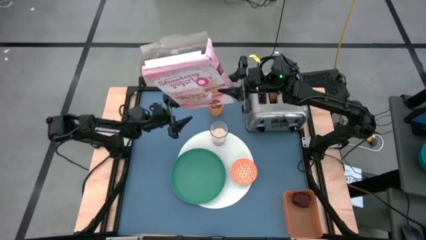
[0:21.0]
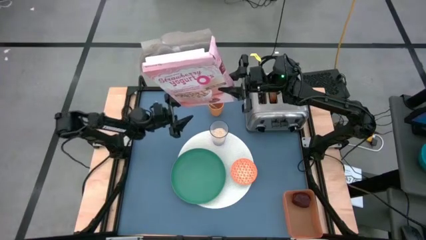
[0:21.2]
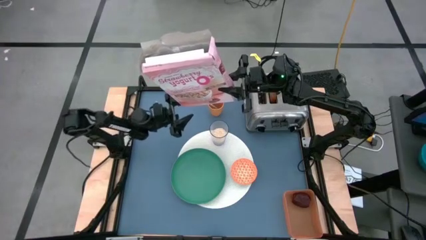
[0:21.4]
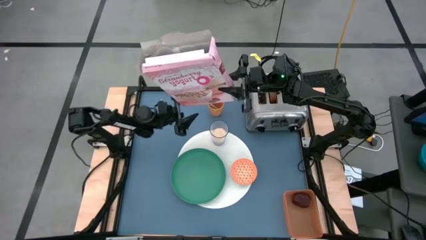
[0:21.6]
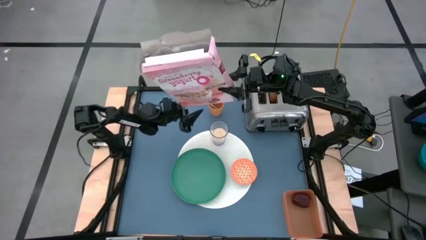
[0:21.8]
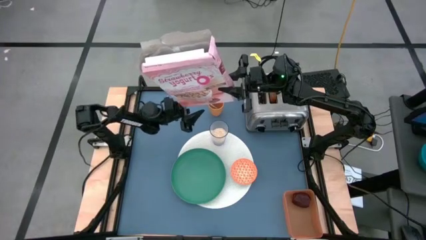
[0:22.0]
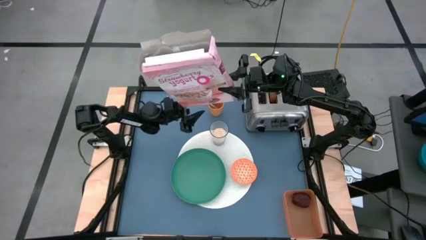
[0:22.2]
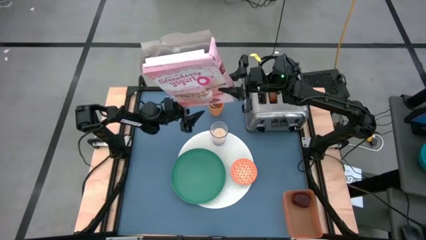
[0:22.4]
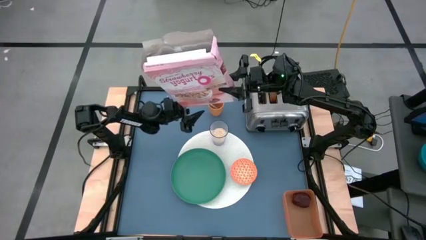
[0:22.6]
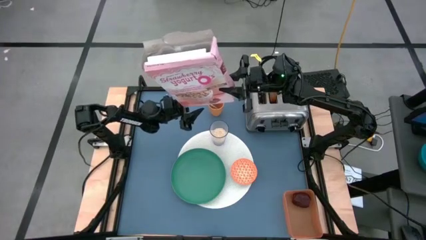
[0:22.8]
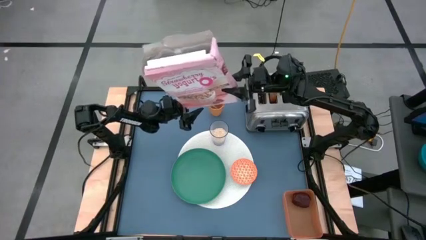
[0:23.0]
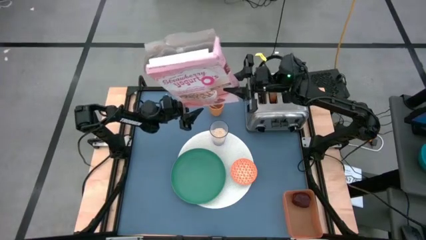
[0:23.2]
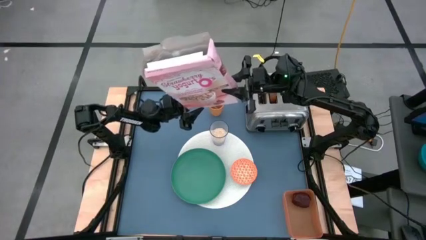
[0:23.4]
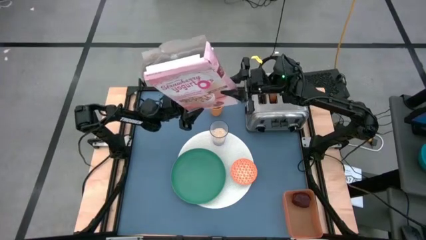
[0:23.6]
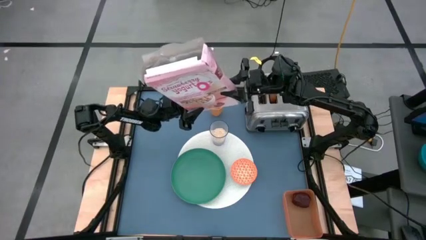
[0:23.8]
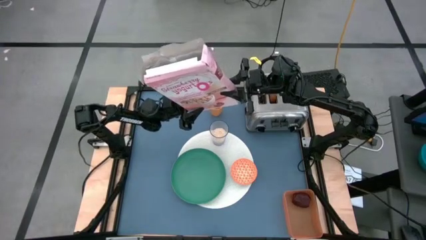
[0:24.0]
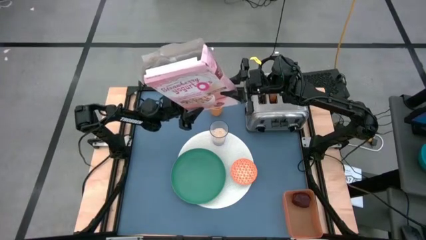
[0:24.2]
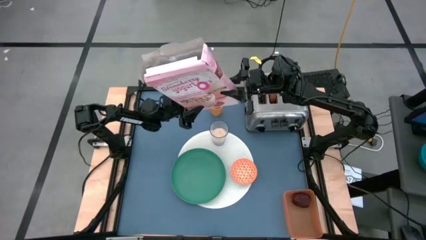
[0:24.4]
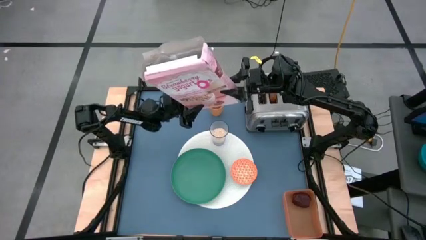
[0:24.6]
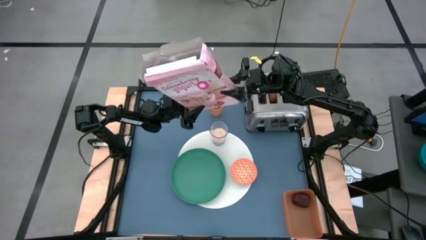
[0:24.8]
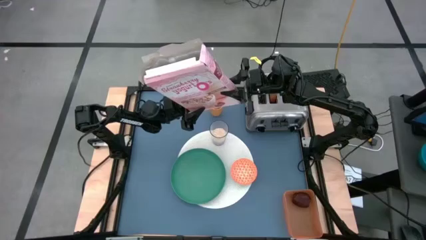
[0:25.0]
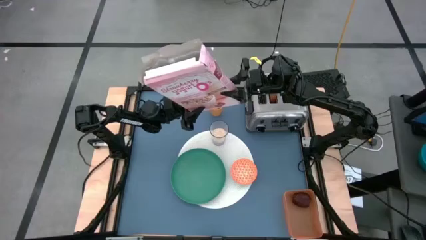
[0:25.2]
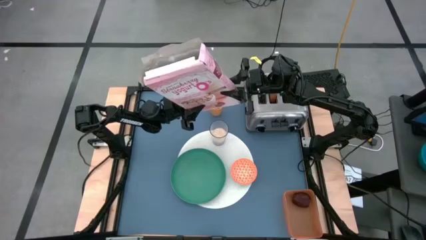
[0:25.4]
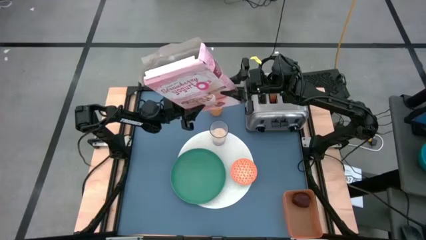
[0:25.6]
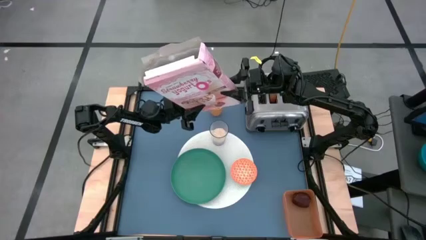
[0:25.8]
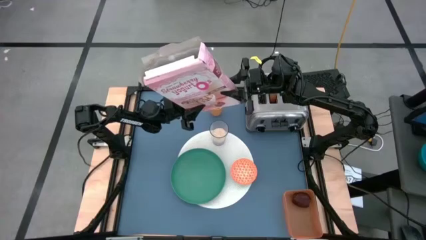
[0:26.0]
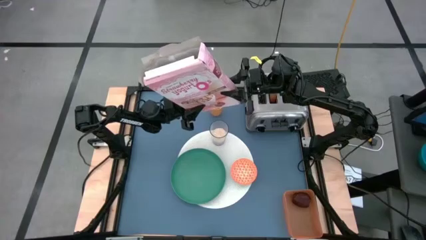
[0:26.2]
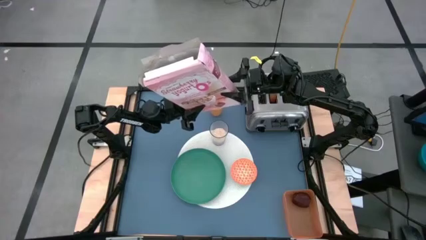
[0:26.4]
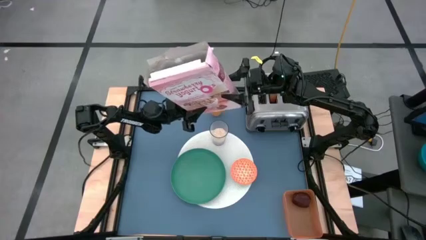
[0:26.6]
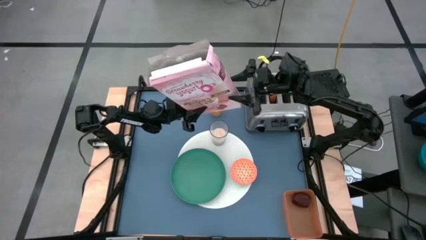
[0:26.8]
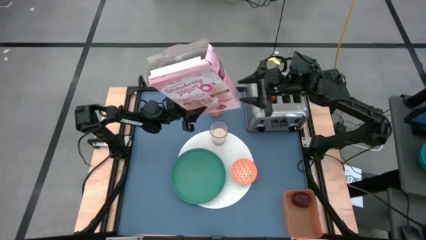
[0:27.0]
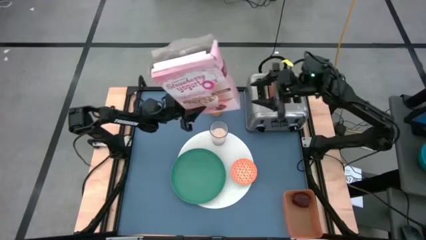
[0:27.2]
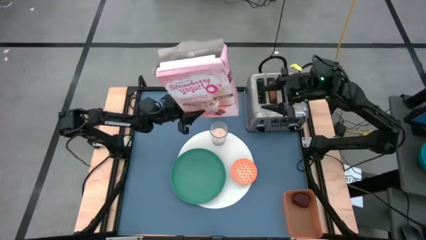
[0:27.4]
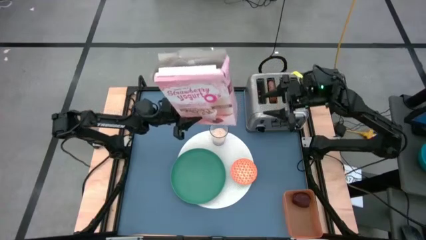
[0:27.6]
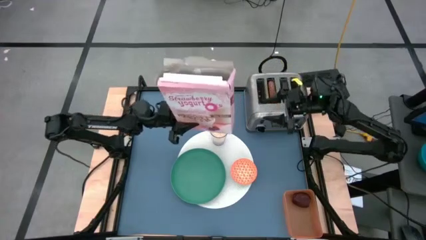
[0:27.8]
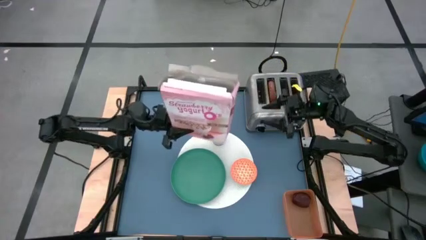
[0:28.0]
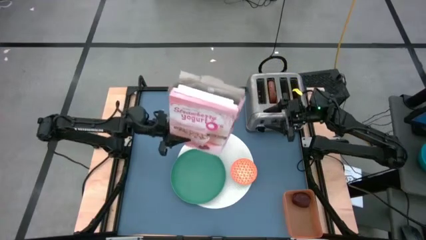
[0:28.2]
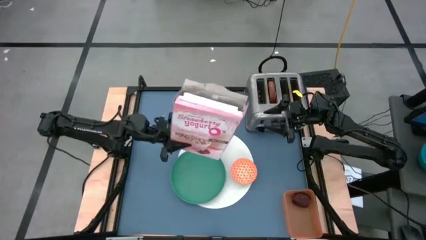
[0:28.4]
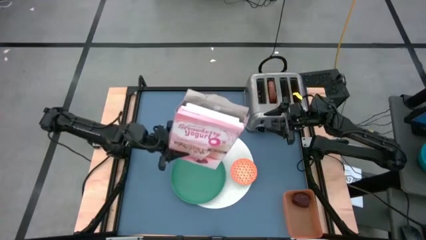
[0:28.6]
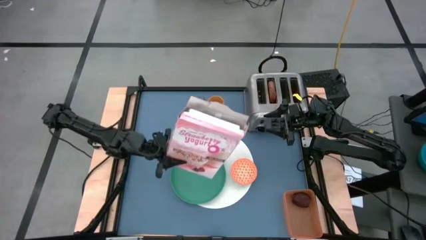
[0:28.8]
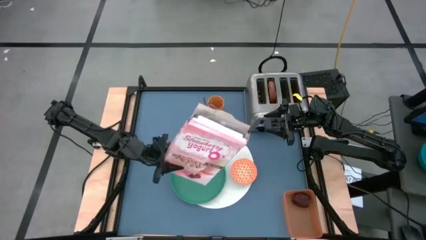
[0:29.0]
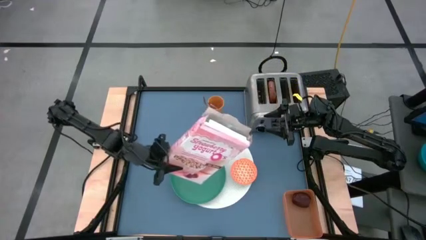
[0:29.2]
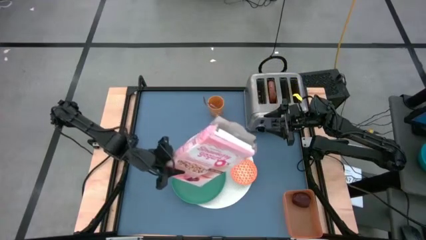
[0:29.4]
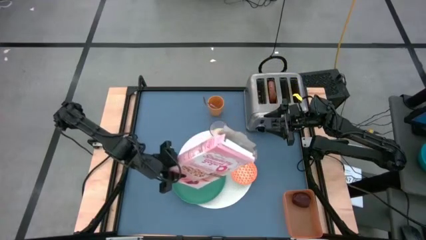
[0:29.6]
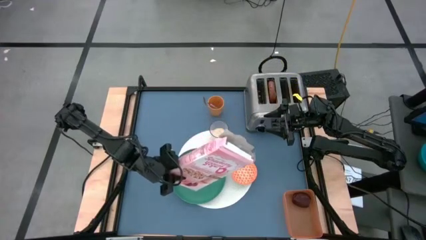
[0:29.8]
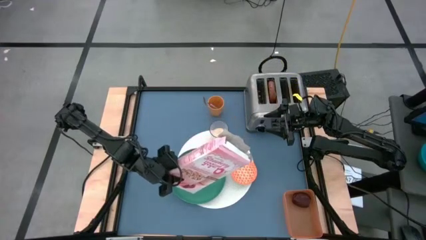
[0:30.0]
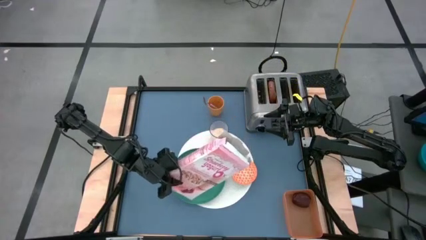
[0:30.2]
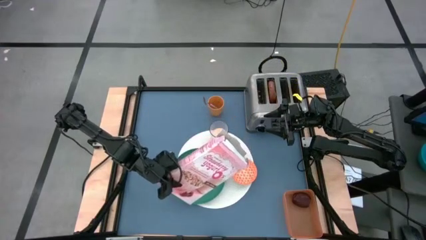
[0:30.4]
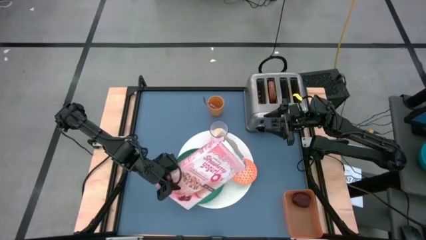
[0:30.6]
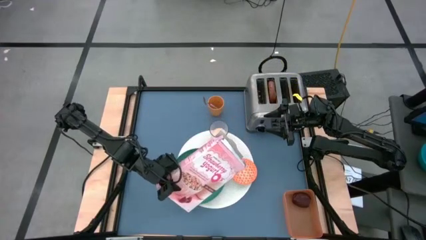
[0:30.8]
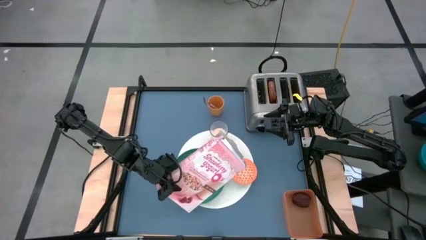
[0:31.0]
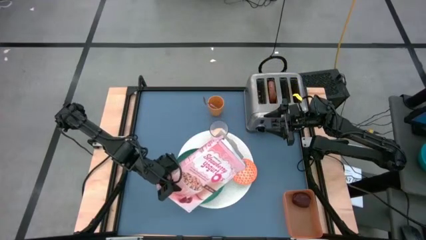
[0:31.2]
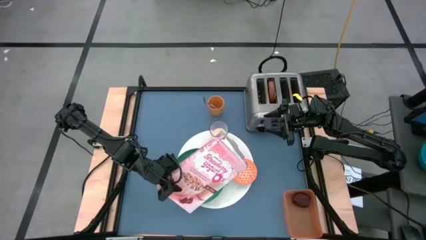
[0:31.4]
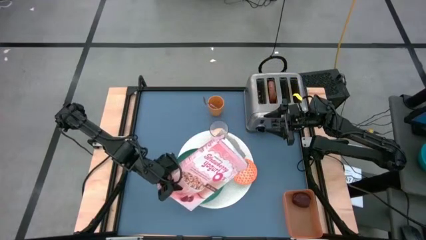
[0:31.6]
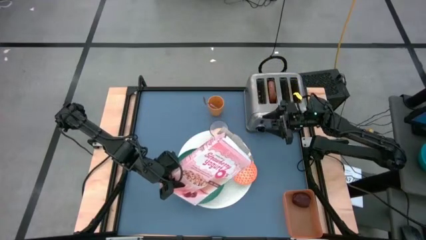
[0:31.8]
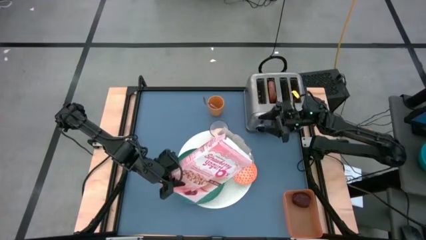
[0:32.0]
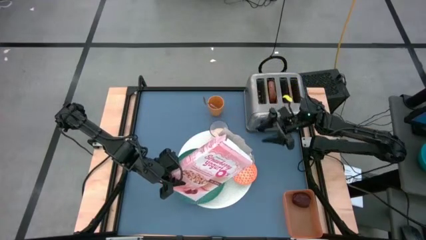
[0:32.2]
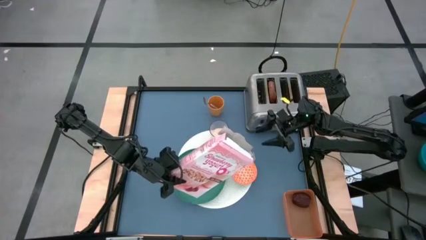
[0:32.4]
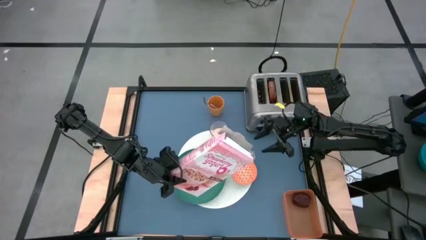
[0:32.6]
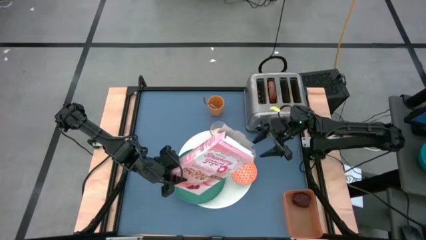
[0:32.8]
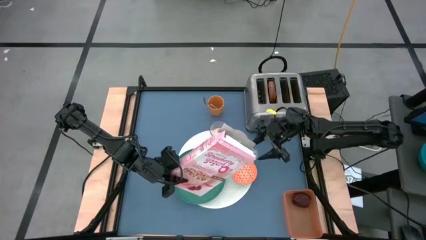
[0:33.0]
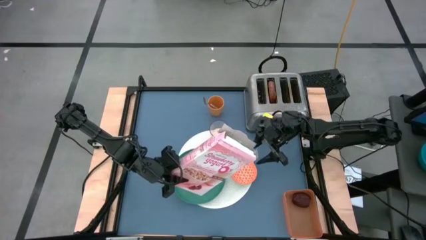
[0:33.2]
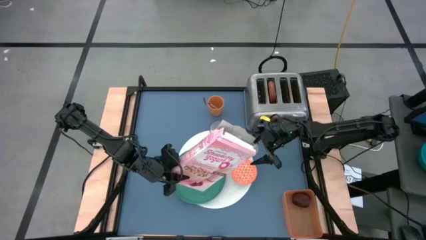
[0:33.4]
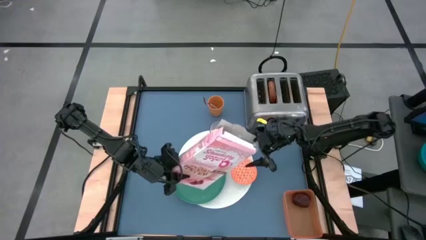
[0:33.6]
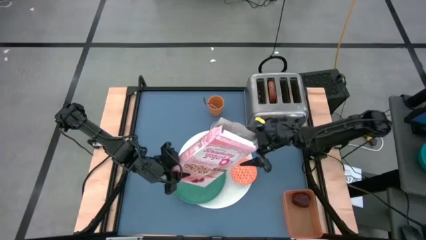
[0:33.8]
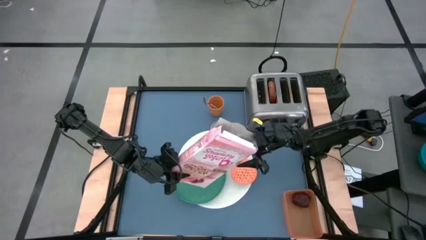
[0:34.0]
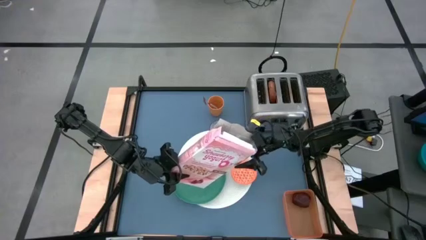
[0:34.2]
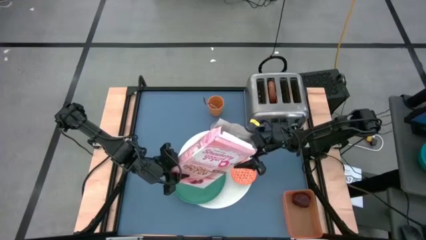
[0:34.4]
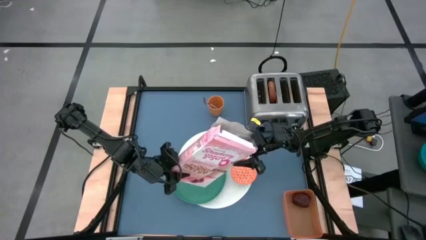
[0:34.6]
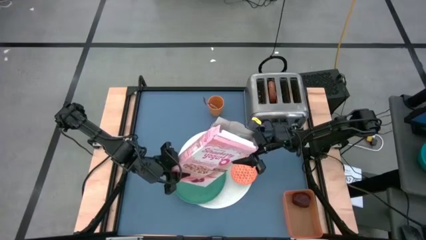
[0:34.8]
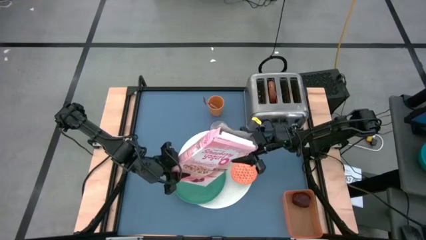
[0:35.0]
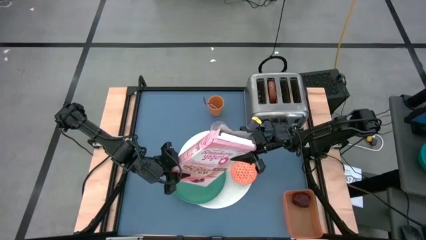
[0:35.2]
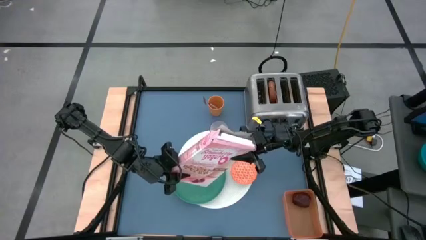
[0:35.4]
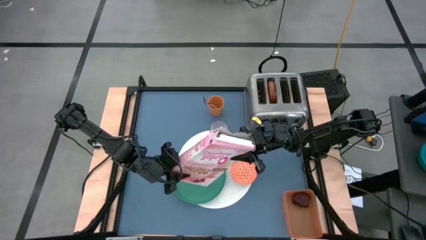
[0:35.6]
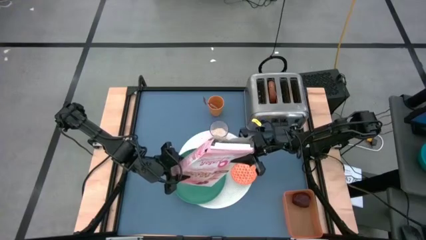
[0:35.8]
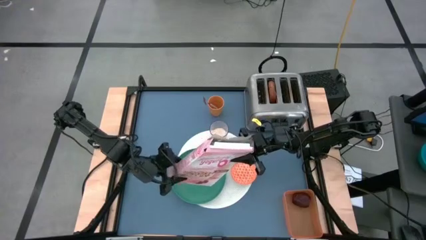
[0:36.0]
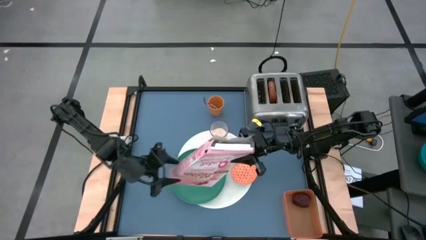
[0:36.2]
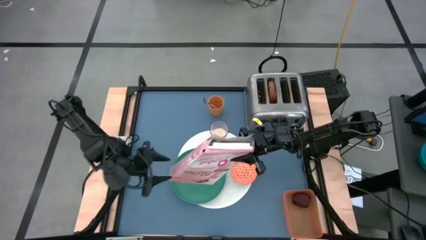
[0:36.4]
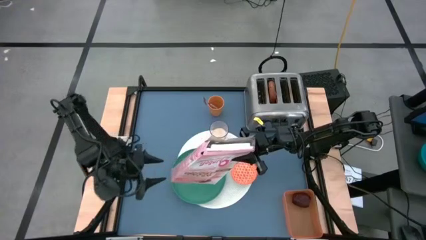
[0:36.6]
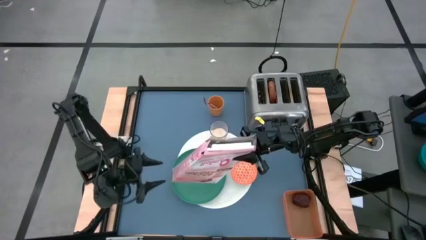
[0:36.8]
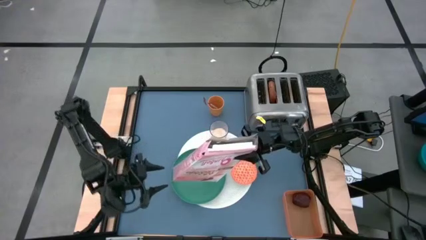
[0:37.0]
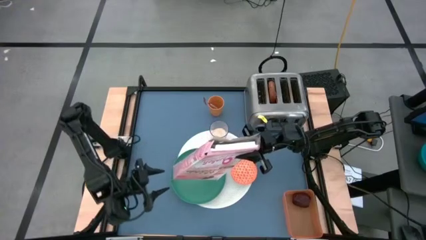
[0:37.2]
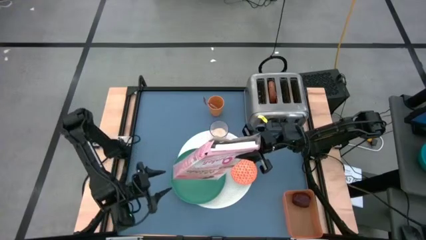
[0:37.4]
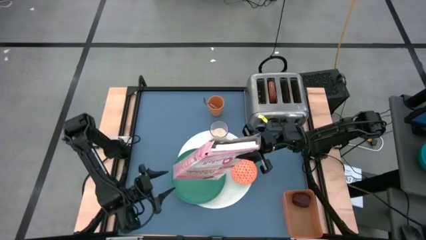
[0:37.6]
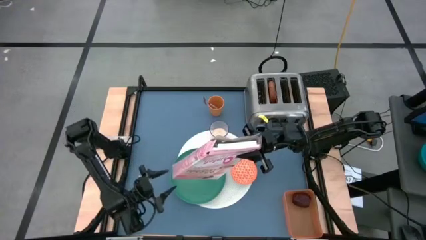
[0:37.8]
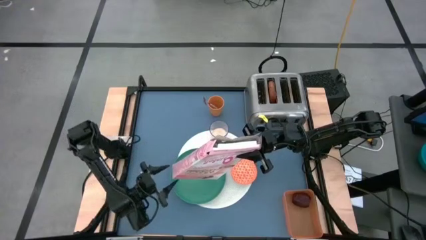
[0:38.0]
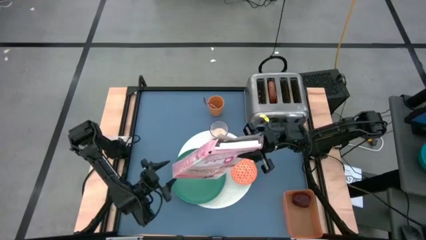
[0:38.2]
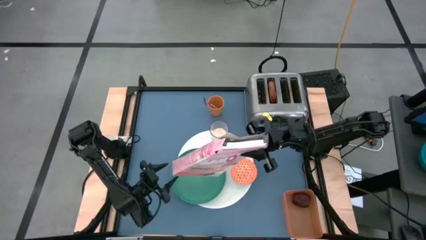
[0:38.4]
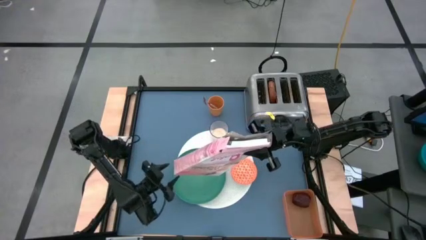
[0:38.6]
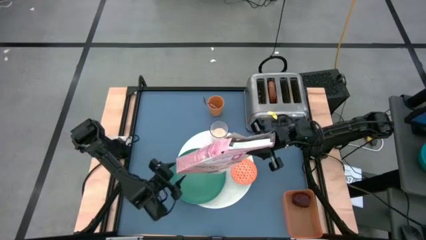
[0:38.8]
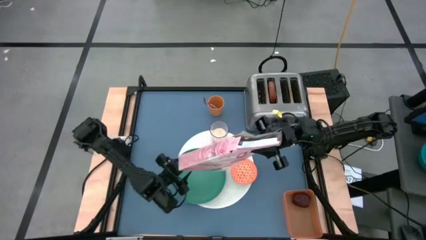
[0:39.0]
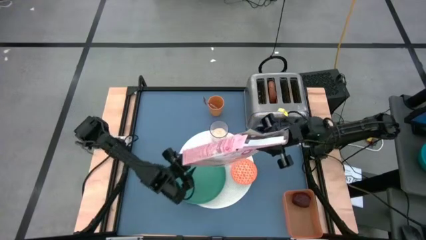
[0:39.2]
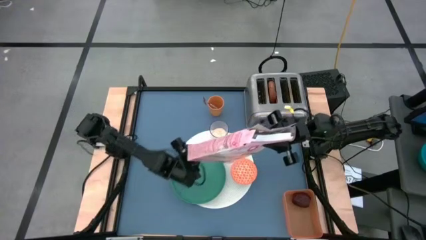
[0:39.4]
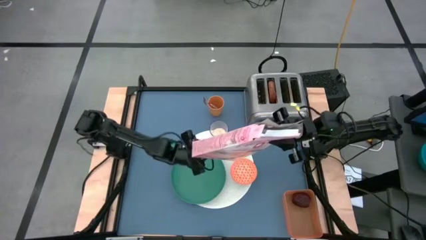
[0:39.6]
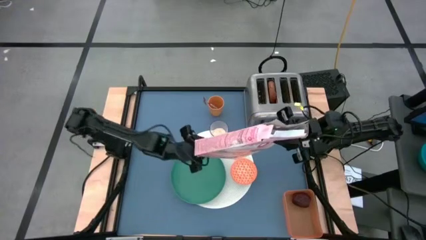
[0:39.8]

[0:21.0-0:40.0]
Task: Arrange a breakfast setting
Pour the cereal from the cereal box into the orange bowl
